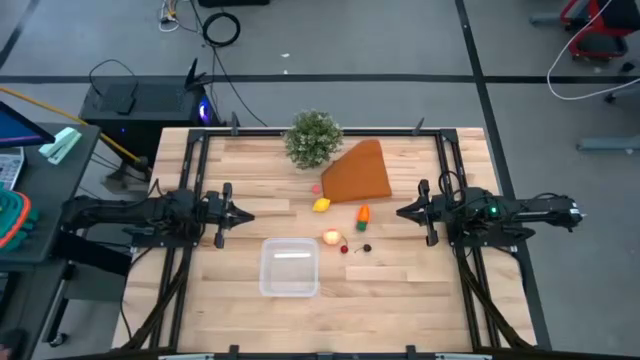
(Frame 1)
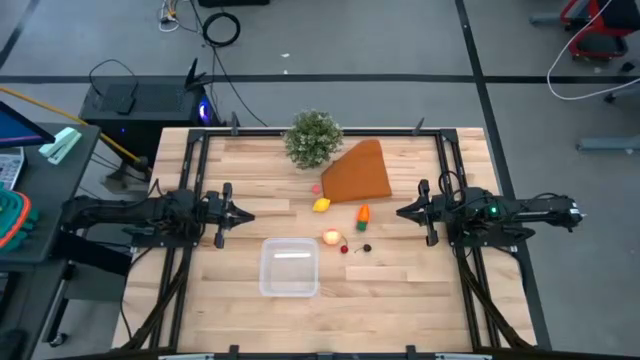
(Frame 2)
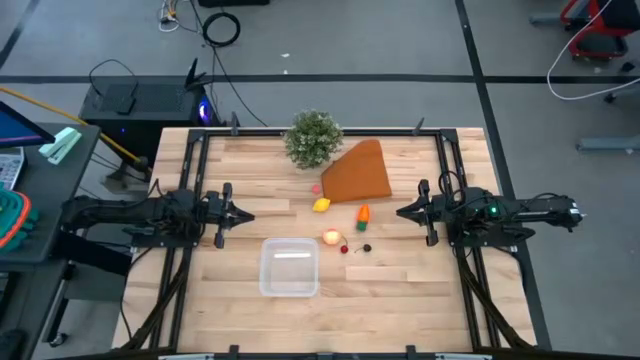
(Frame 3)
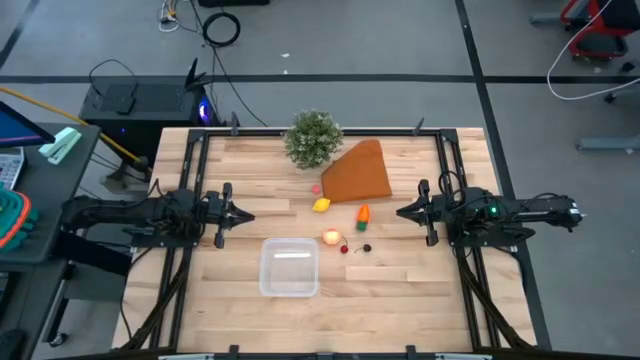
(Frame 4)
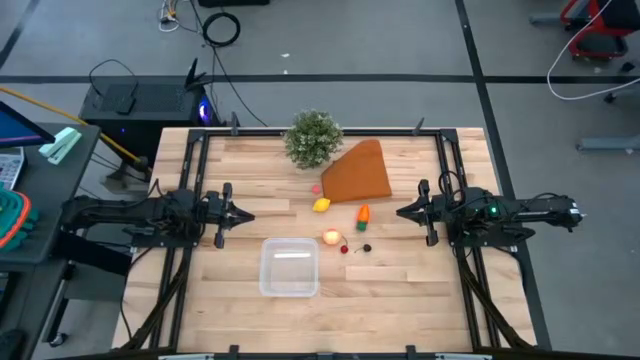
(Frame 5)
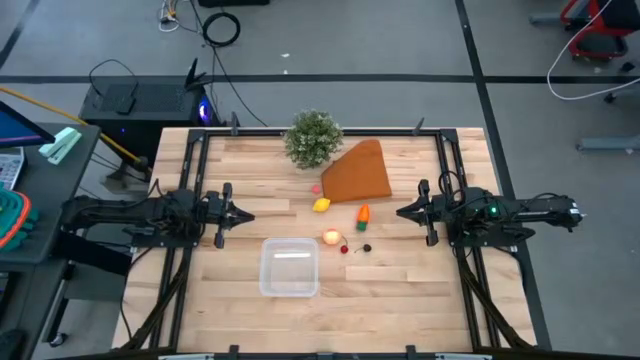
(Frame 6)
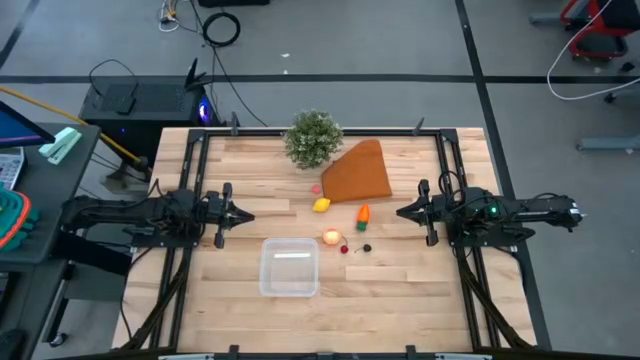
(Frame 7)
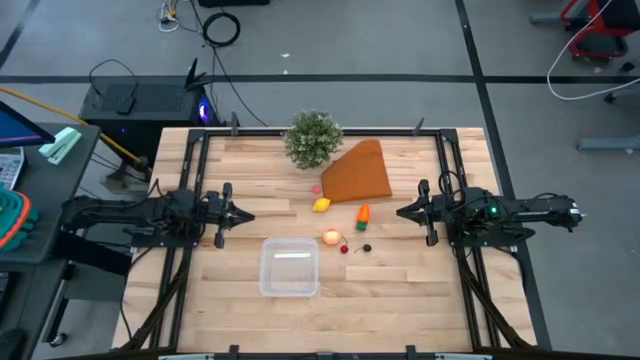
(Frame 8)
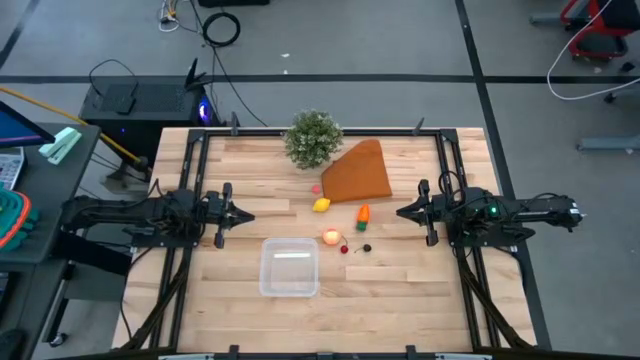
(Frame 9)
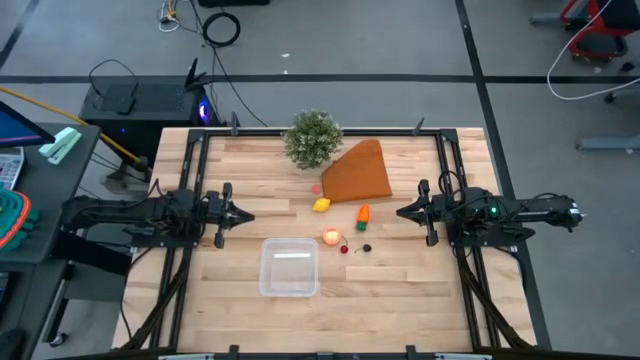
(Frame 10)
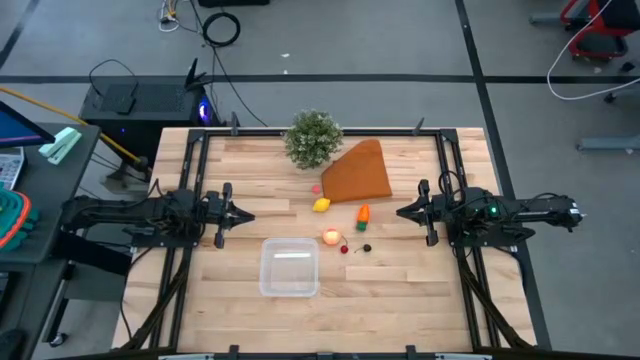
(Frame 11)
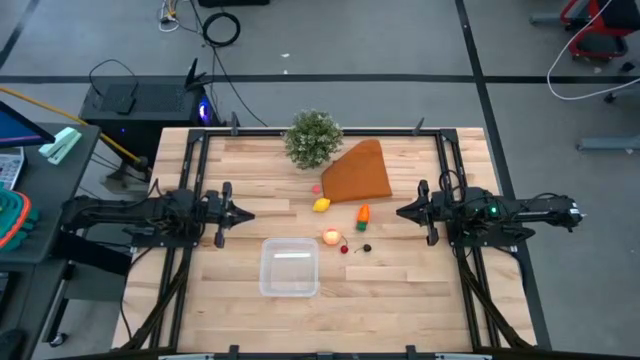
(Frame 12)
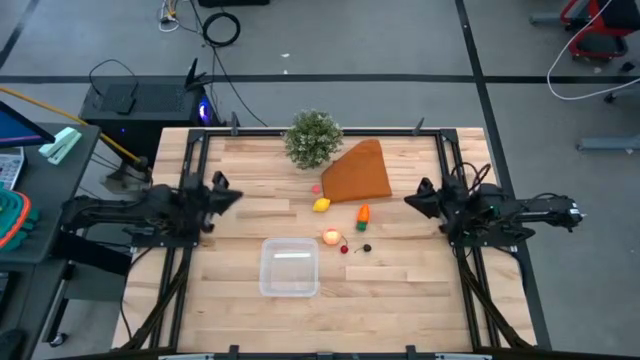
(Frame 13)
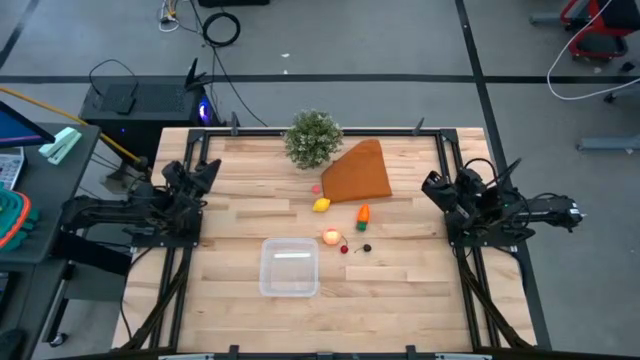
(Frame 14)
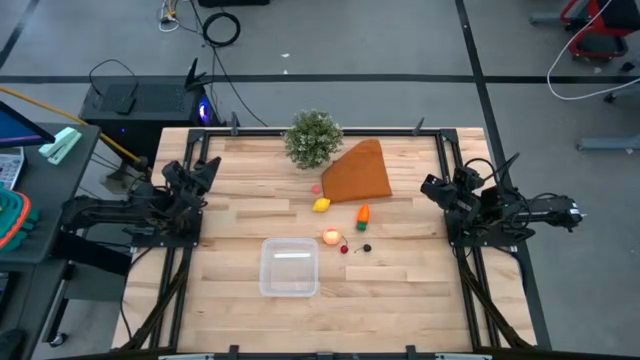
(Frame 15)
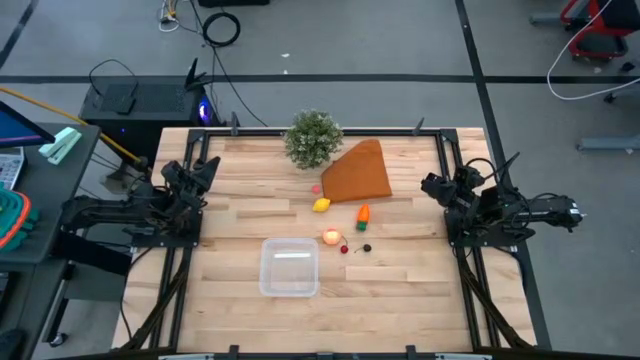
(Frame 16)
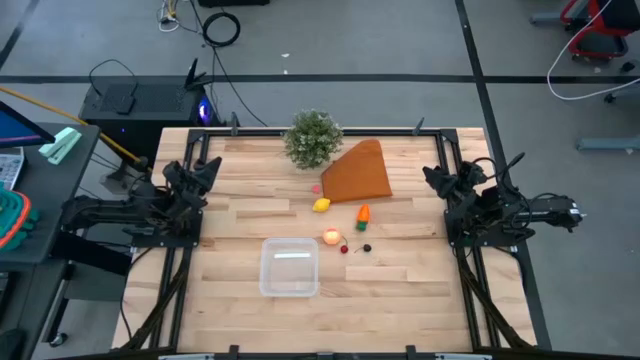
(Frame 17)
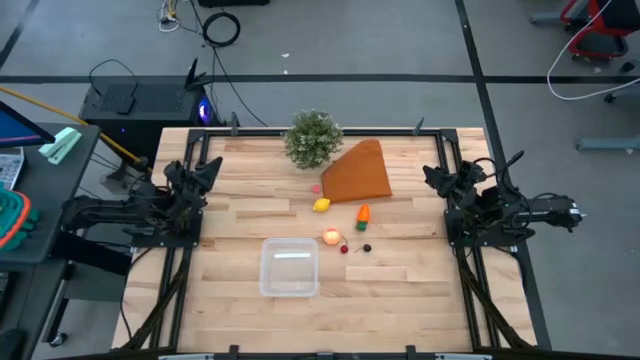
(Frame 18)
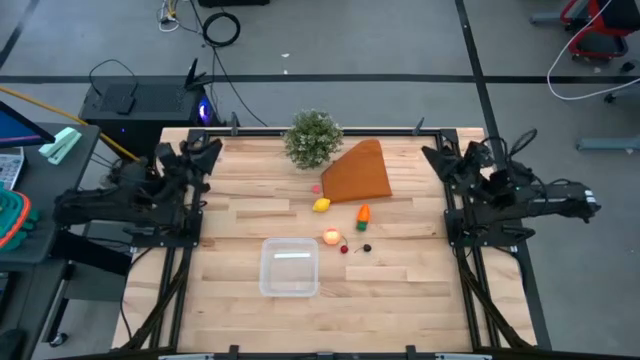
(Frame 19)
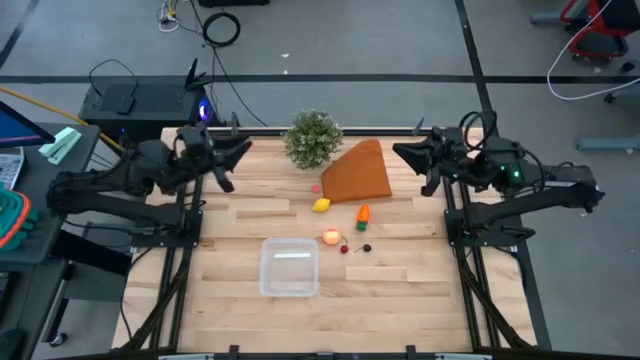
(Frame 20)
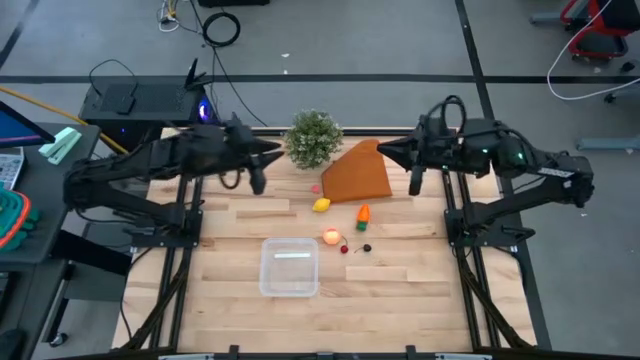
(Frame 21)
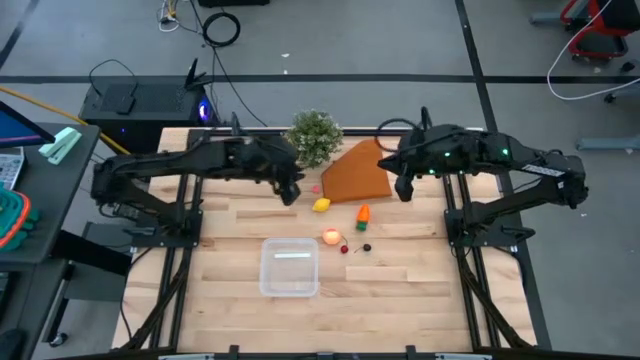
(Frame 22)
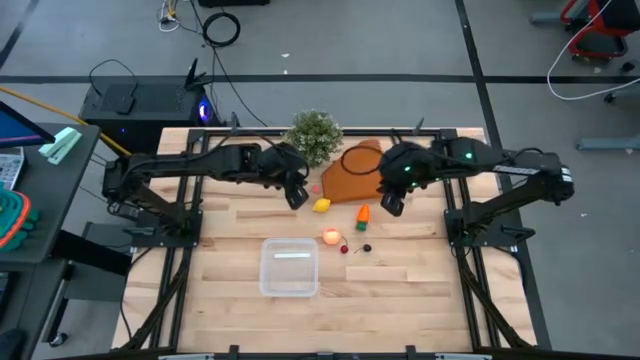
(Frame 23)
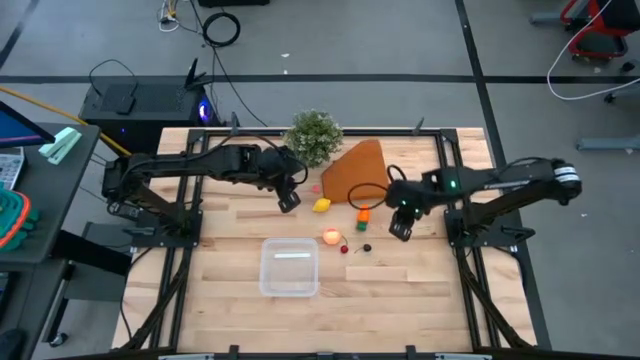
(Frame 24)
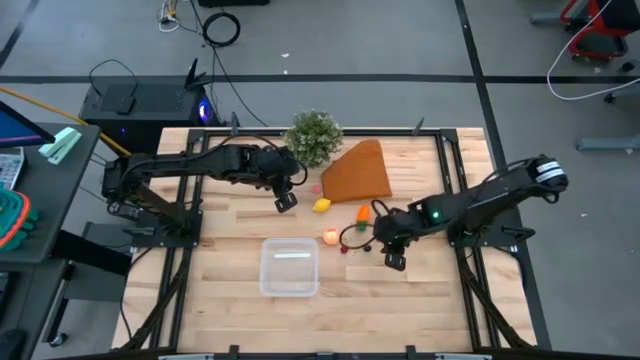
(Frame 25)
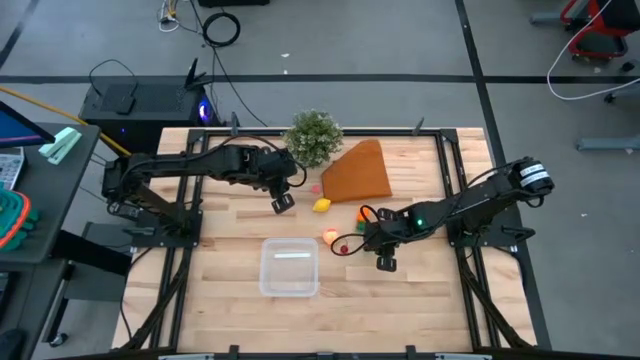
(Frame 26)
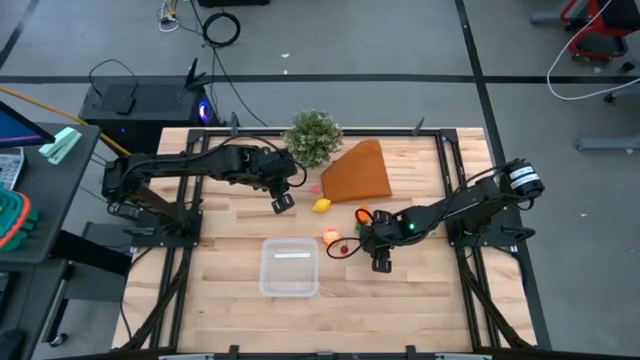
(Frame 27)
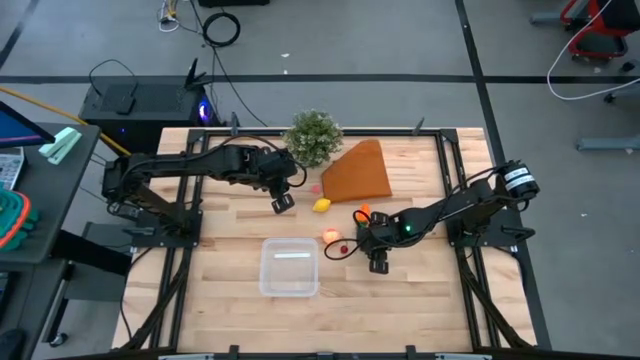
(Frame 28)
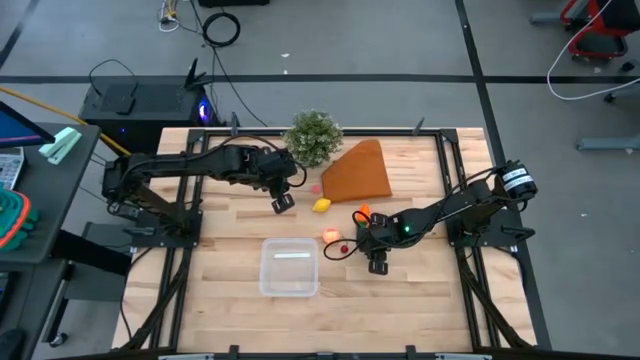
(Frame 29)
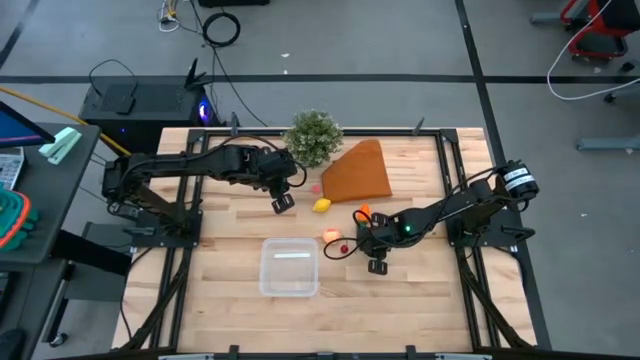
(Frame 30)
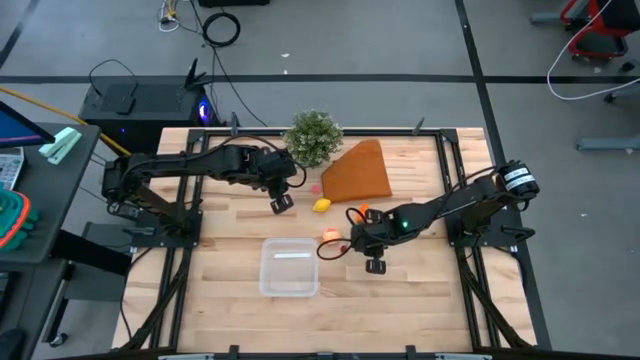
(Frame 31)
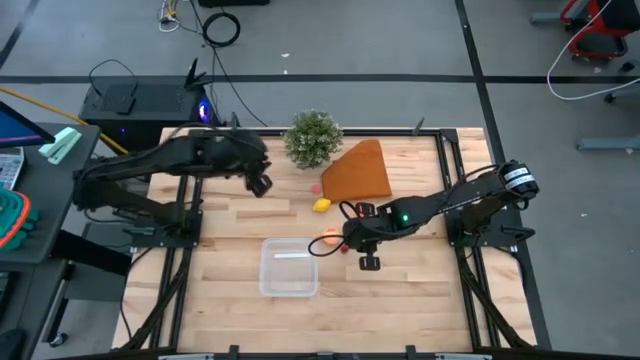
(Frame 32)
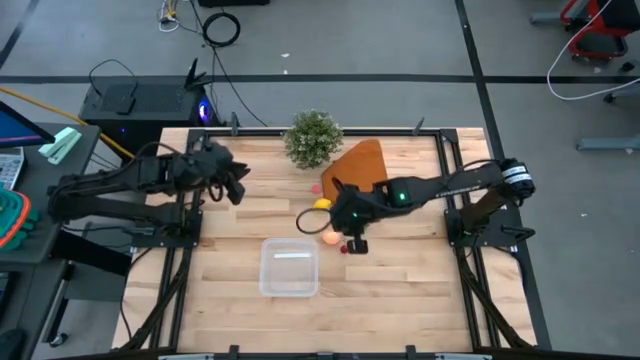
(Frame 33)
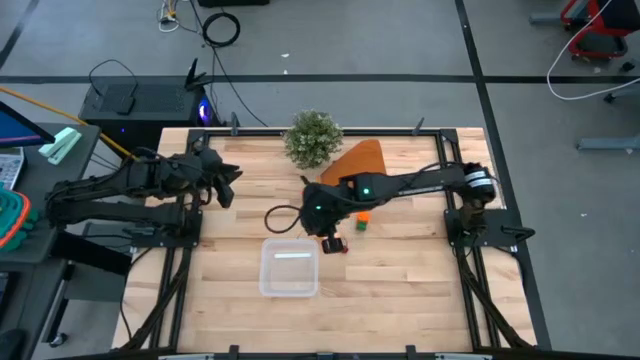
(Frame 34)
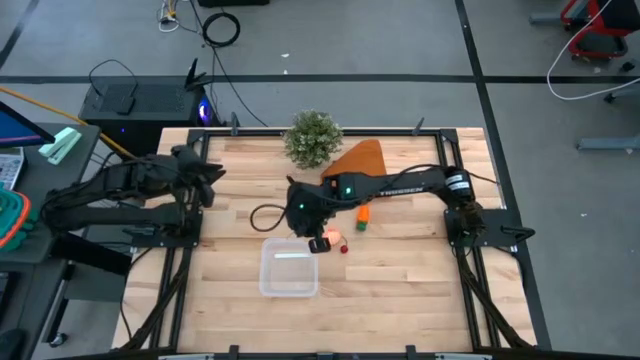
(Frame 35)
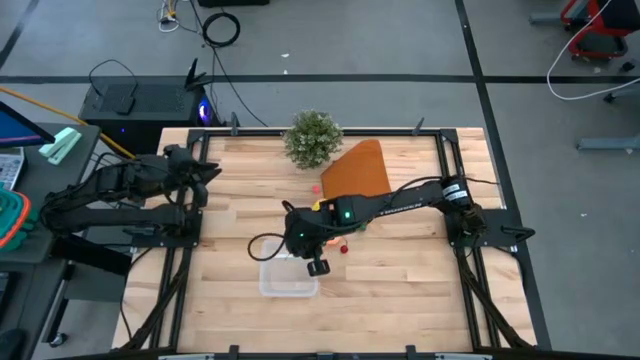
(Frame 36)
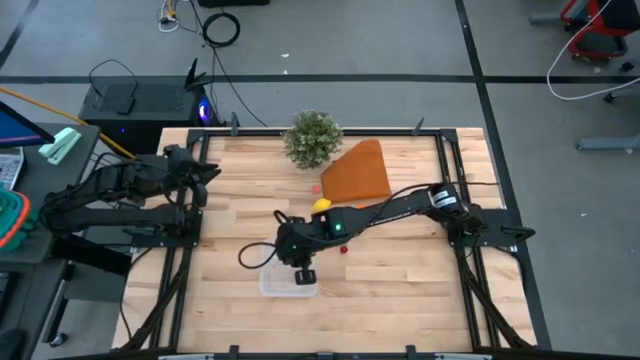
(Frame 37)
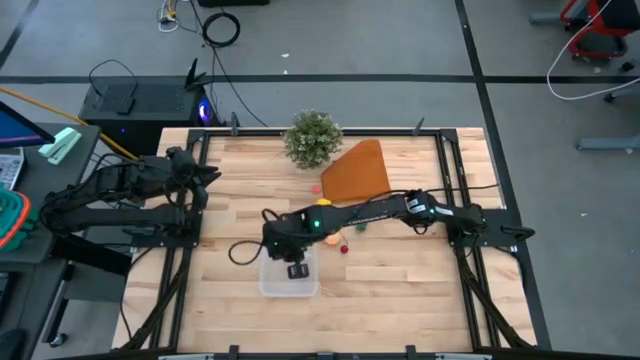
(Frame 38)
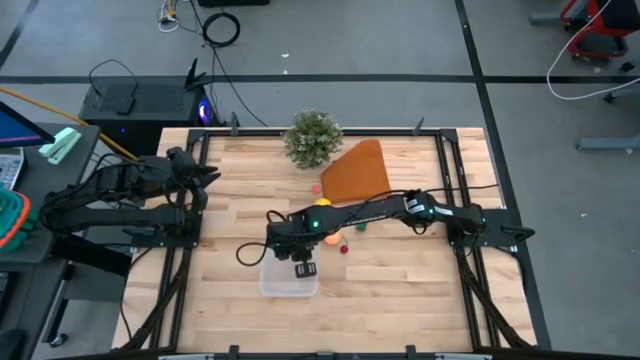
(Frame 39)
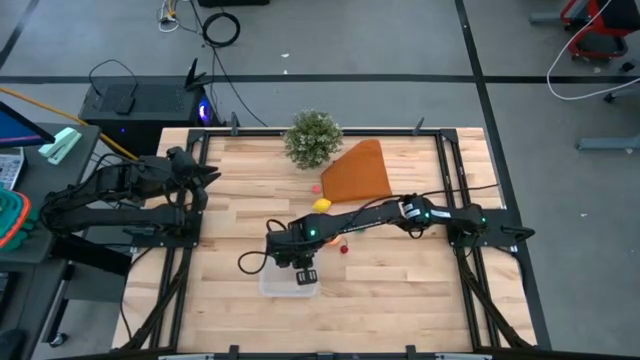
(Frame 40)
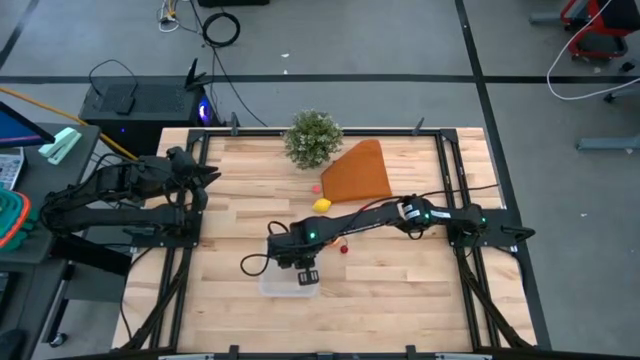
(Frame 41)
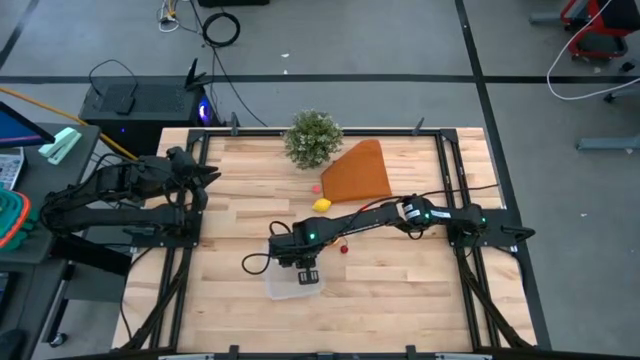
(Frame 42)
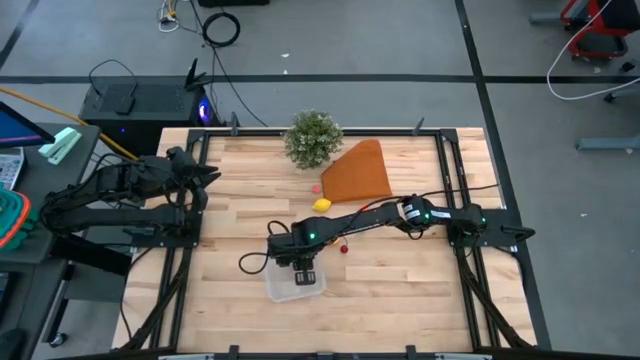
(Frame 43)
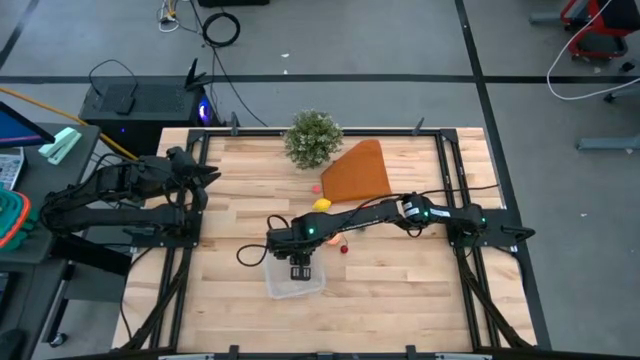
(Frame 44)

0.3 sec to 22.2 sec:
Task: Pick and placing Produce into tupperware
Put the black cherry into the transparent bin
